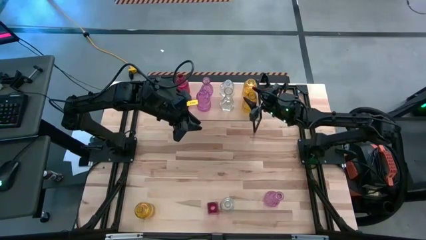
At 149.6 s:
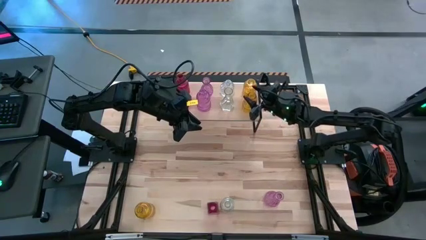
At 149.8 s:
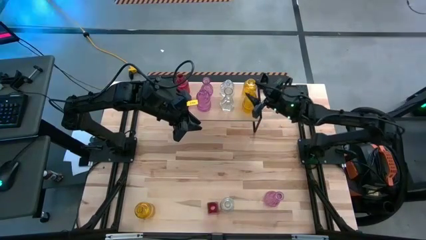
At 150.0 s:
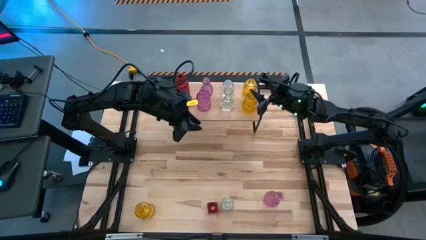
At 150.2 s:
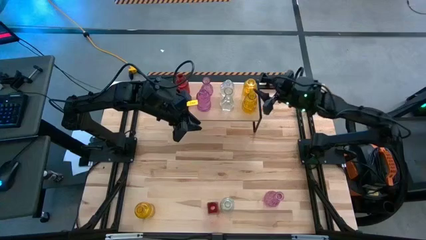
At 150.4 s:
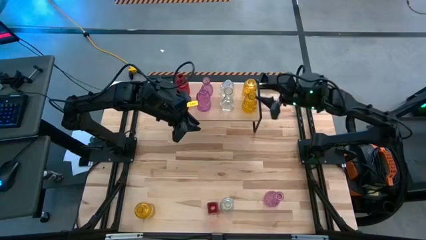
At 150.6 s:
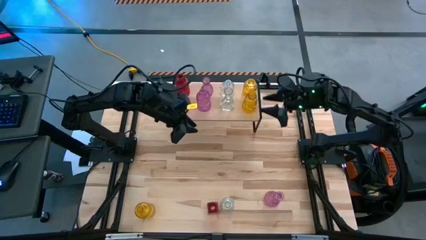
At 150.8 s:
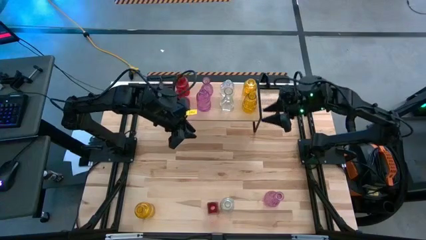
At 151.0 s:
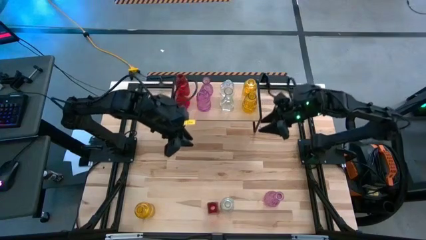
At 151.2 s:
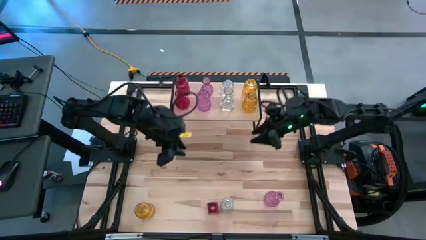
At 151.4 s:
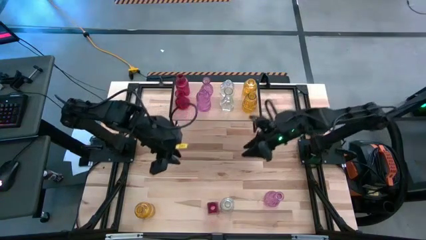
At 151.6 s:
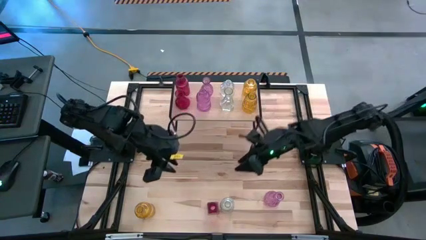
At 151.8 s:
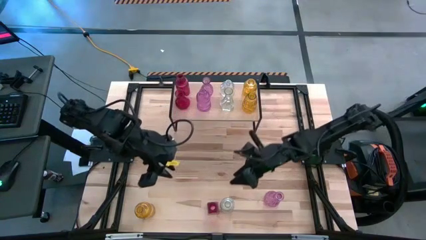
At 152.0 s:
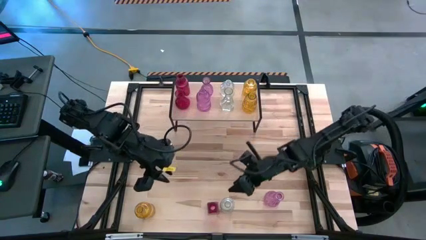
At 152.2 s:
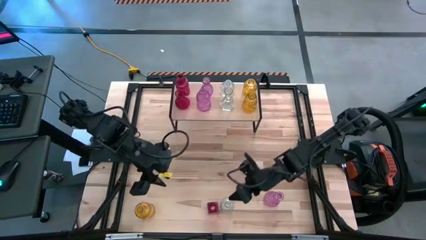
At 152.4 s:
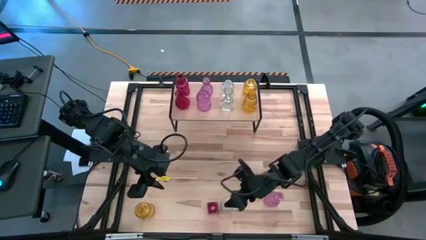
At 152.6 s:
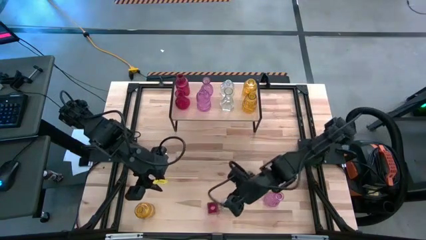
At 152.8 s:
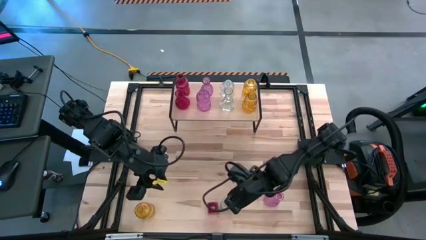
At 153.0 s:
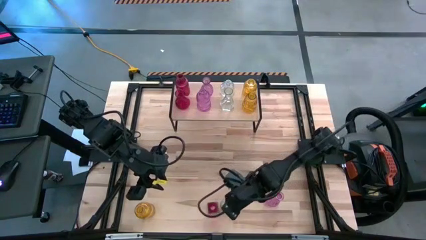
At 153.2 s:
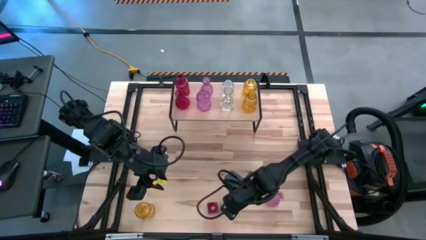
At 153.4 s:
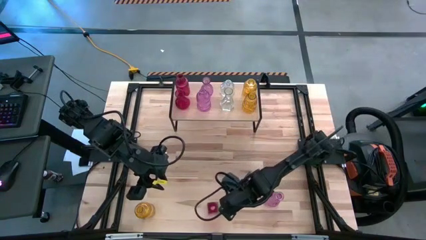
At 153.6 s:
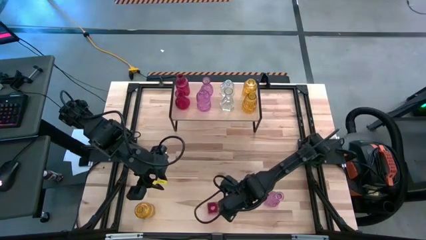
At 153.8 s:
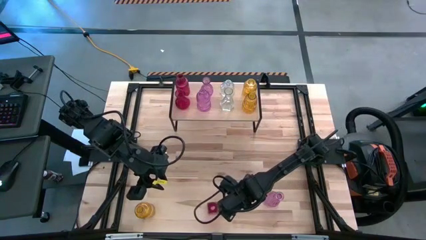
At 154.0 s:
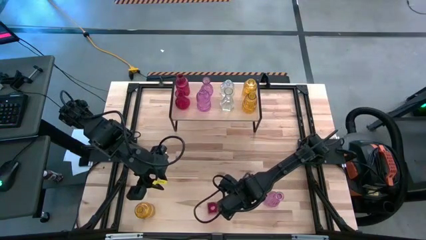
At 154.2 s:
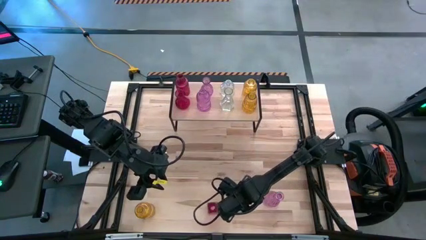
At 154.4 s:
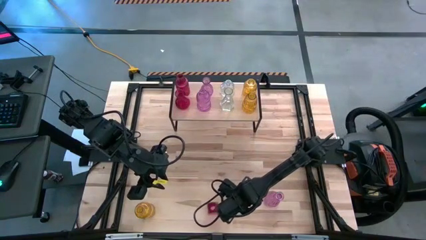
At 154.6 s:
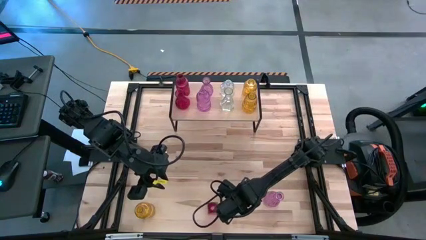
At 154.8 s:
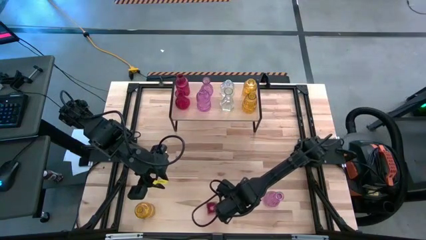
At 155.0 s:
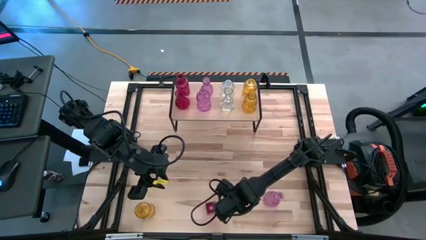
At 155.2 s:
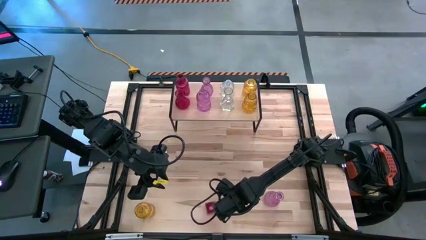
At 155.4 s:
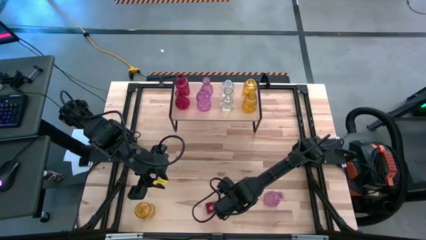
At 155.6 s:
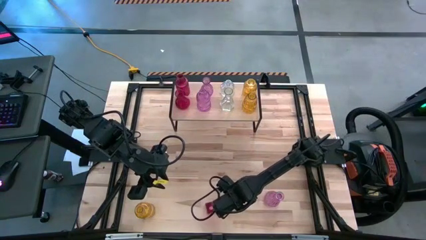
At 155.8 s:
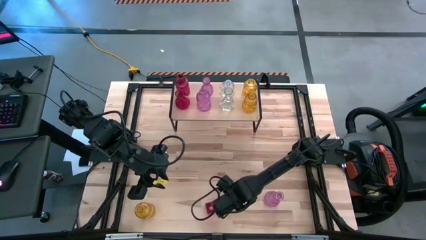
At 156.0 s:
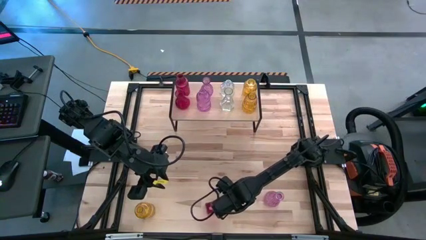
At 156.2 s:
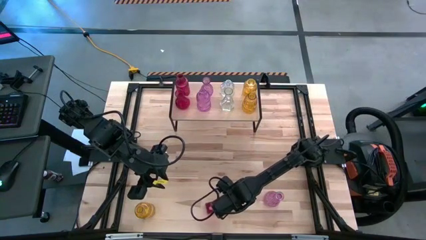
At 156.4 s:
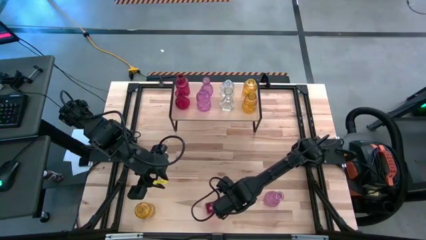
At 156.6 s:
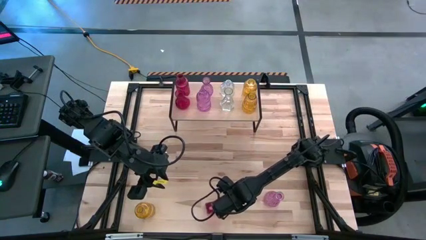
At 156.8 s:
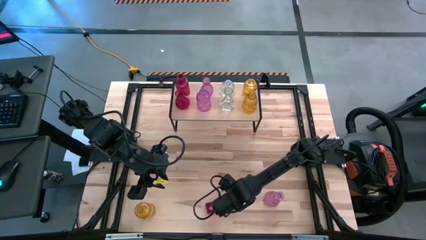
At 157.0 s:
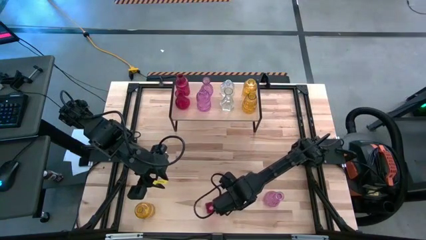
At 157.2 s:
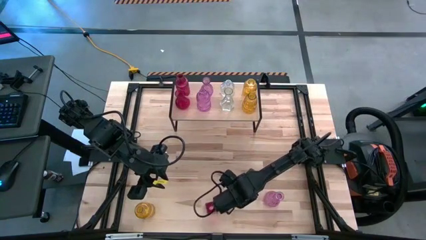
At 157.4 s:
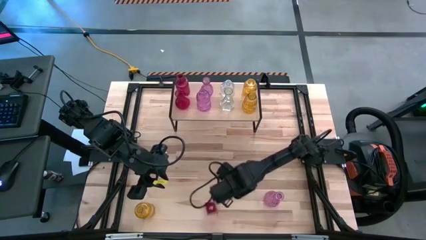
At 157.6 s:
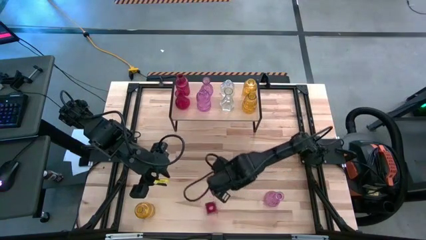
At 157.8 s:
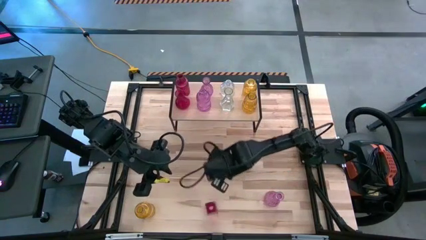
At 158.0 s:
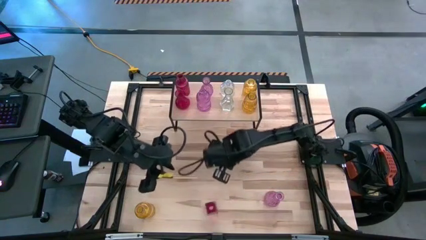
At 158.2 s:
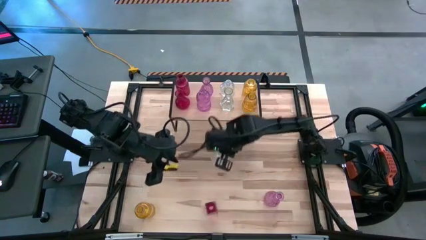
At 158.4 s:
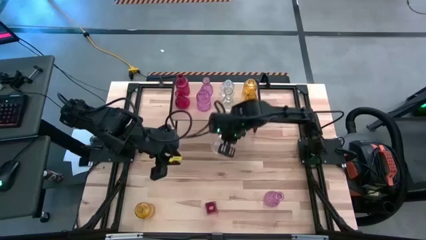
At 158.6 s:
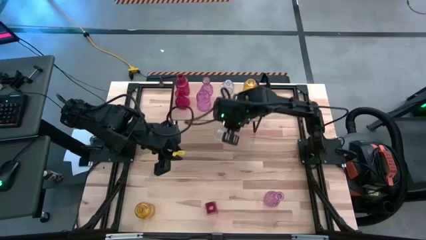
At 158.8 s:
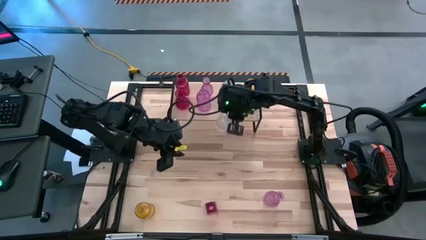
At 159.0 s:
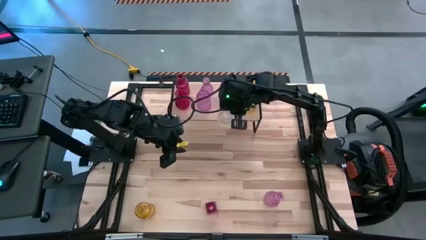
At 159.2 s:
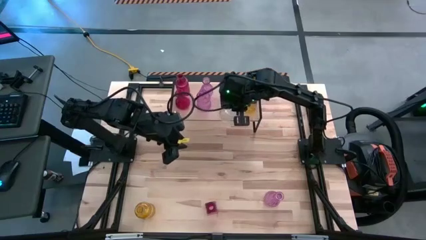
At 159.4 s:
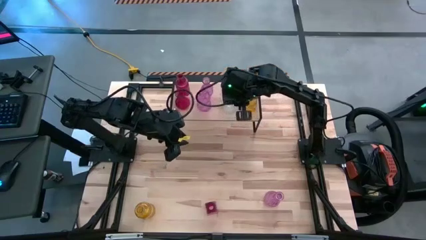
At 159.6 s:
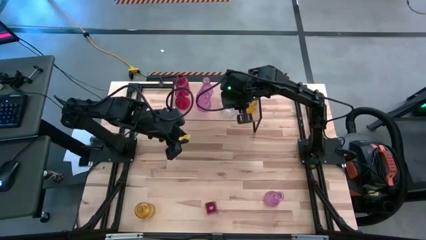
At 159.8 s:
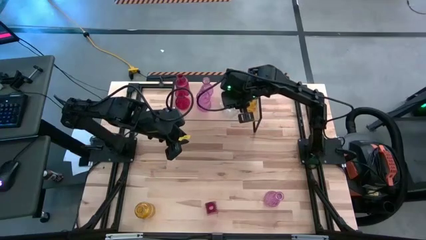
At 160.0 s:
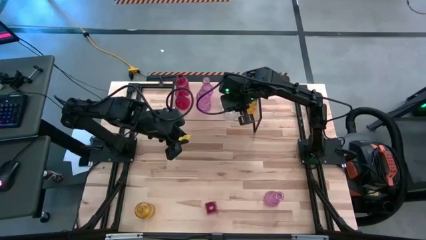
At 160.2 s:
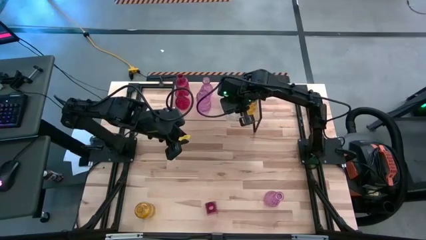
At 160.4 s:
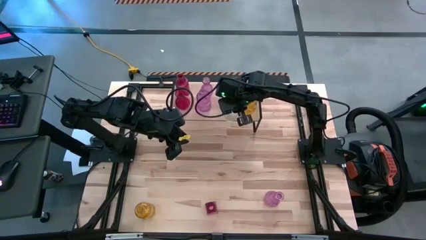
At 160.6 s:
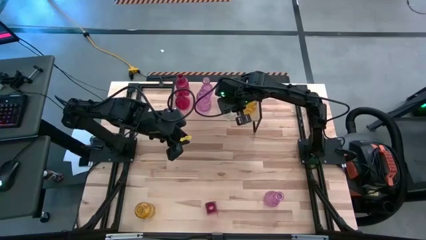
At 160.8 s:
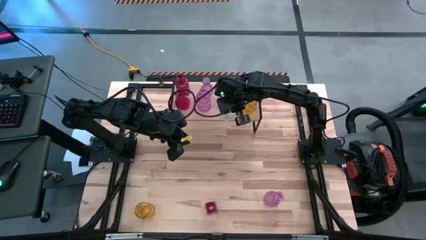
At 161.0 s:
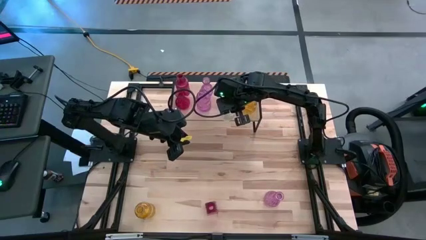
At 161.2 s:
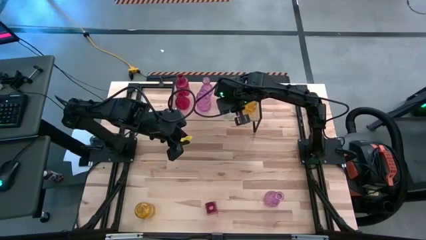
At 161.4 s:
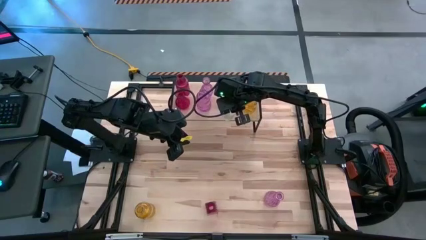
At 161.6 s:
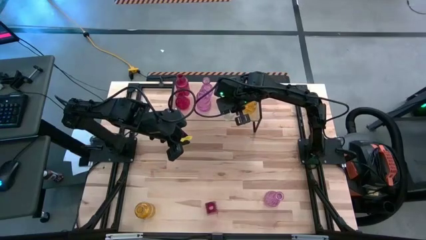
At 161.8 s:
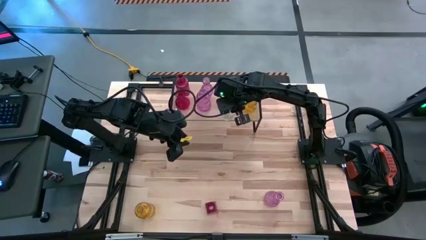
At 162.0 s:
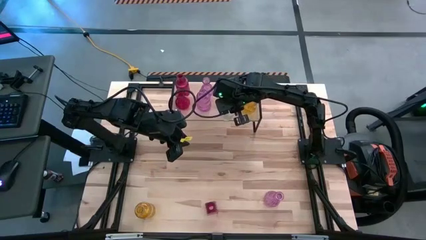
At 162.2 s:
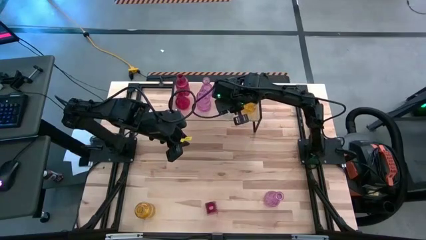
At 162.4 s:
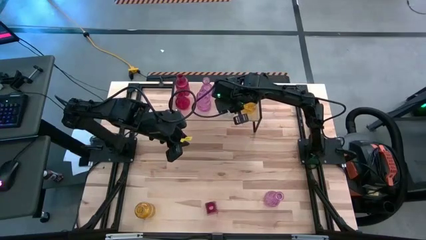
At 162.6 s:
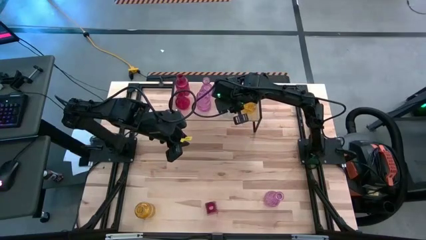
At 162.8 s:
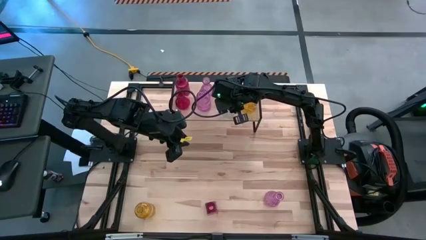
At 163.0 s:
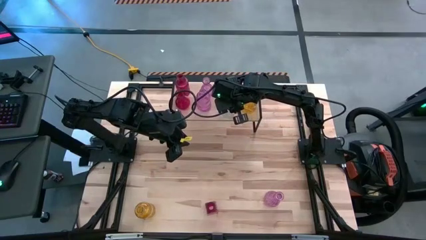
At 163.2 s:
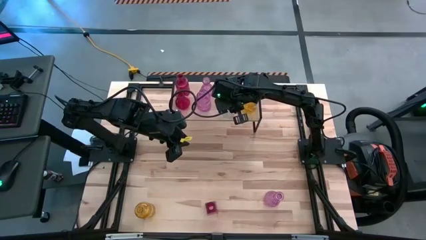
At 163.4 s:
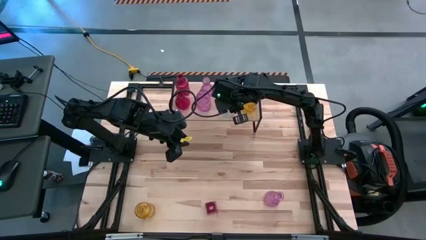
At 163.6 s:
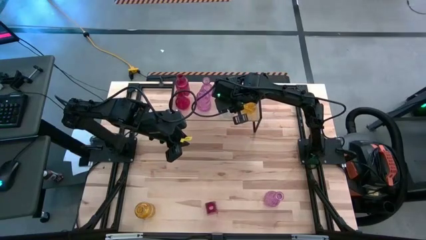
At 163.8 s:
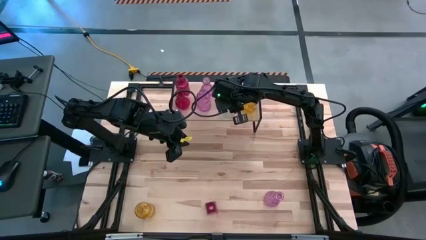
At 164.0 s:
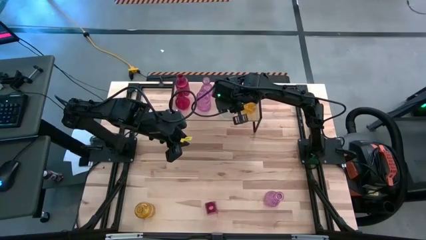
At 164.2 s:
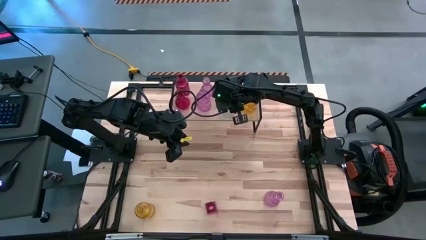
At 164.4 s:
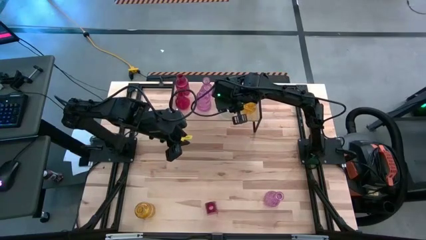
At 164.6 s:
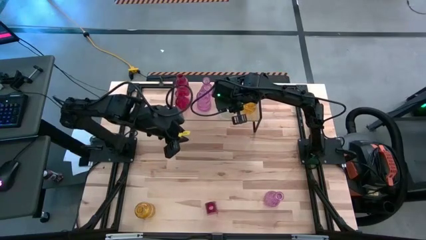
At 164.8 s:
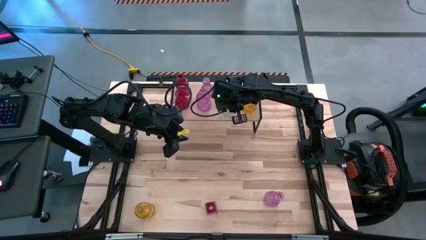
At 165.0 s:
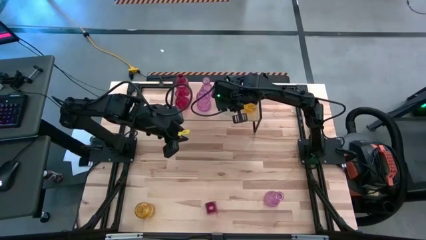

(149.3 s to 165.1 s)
Task: sort vases onto shelf
Put the transparent vase on the shelf aligned with the other transparent vases
